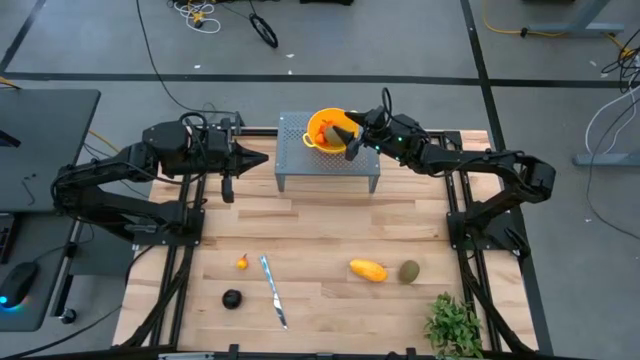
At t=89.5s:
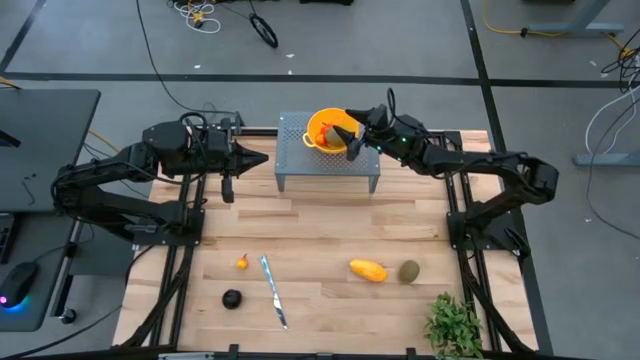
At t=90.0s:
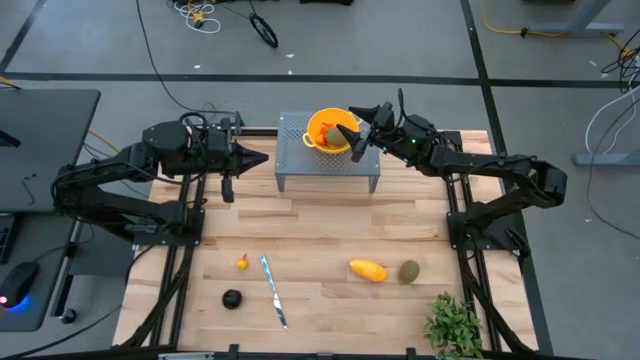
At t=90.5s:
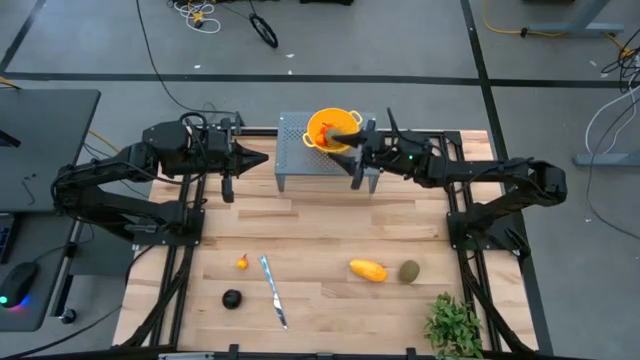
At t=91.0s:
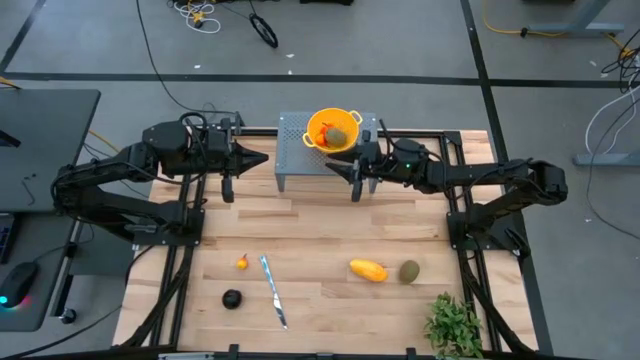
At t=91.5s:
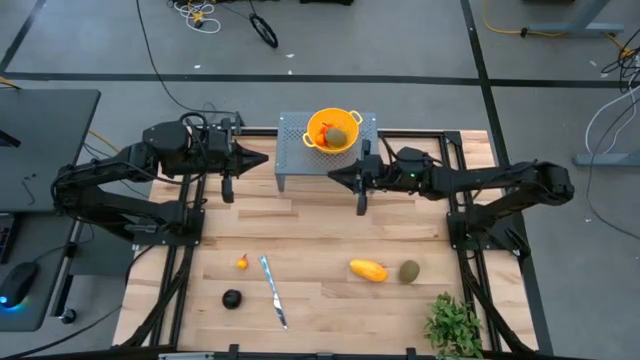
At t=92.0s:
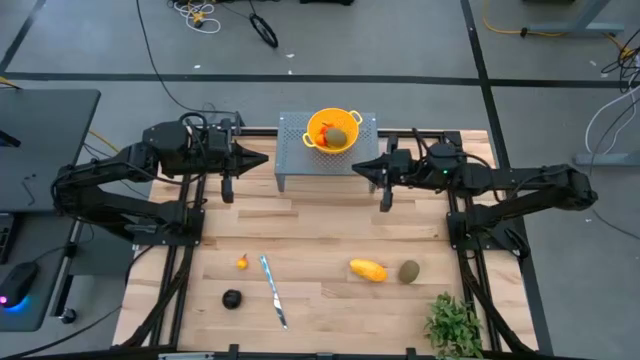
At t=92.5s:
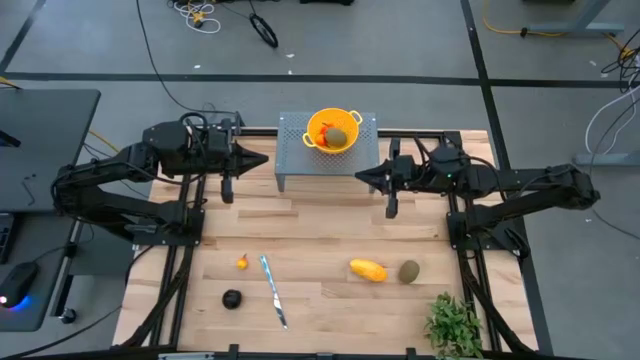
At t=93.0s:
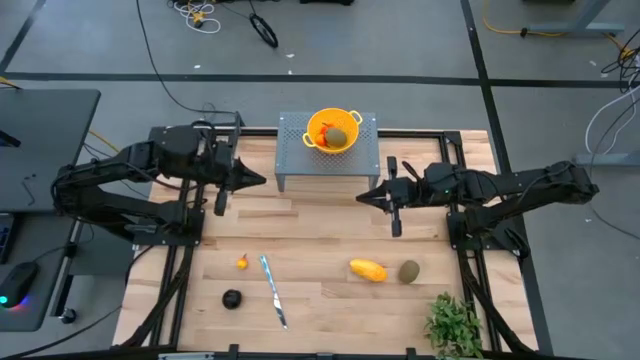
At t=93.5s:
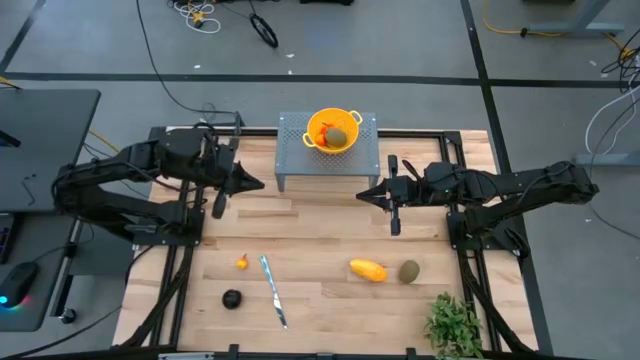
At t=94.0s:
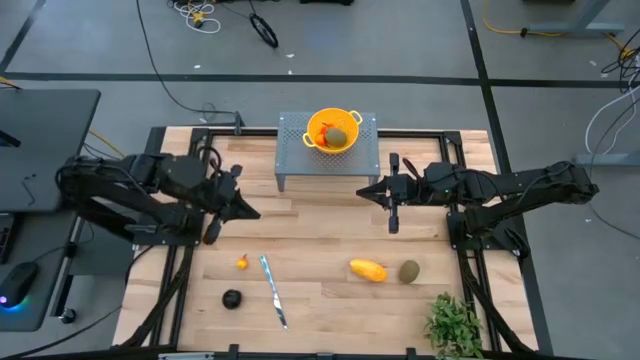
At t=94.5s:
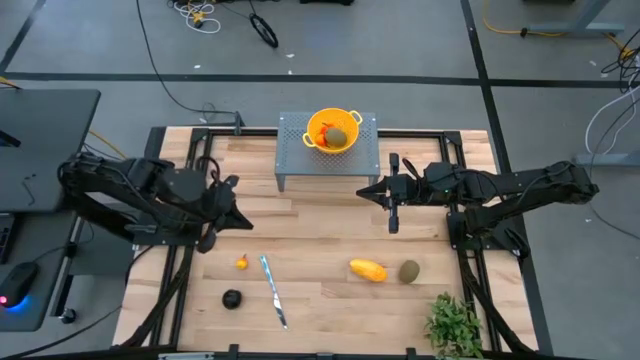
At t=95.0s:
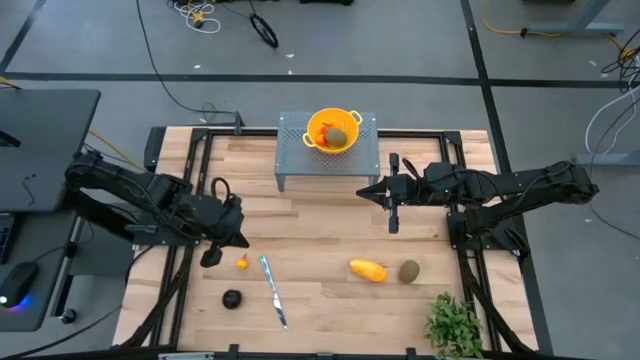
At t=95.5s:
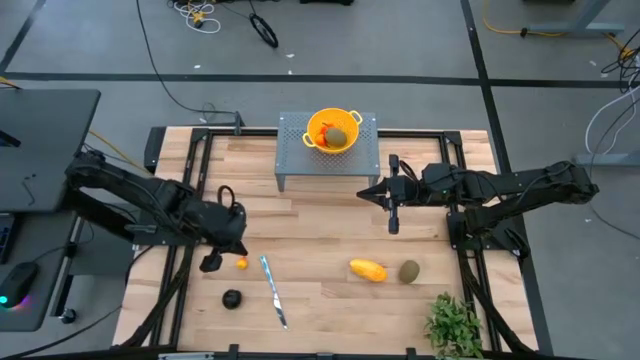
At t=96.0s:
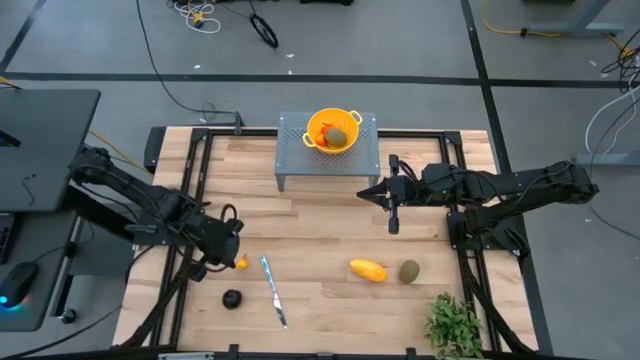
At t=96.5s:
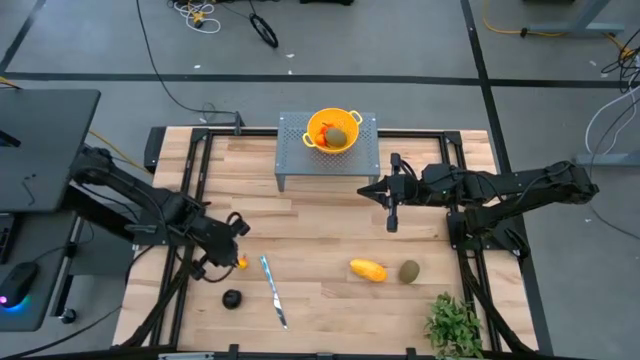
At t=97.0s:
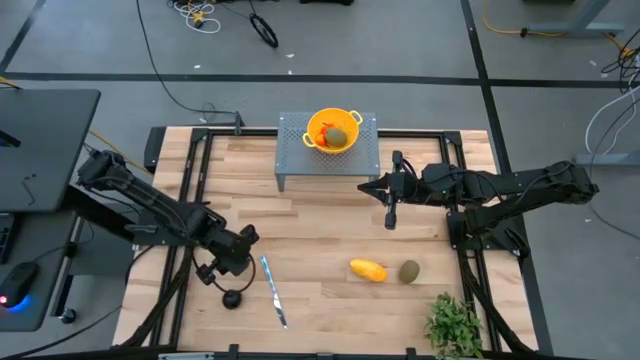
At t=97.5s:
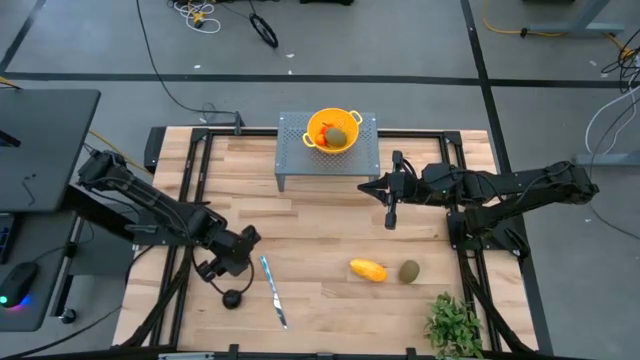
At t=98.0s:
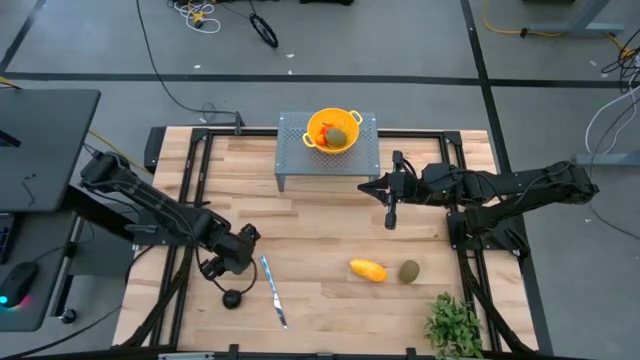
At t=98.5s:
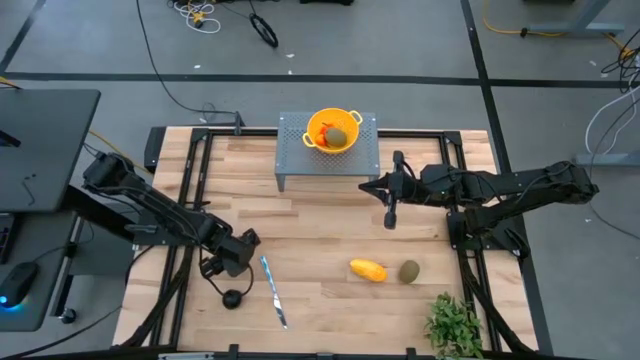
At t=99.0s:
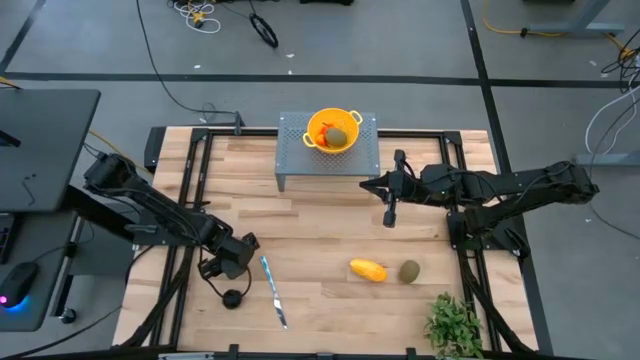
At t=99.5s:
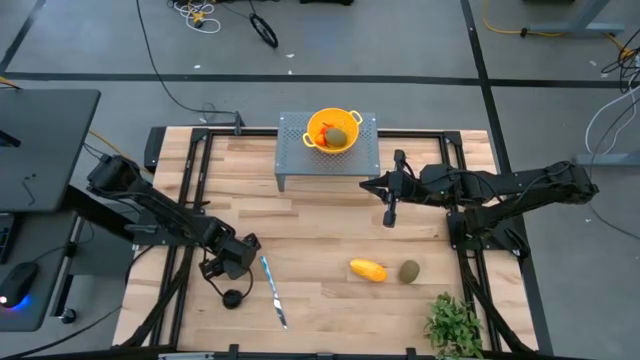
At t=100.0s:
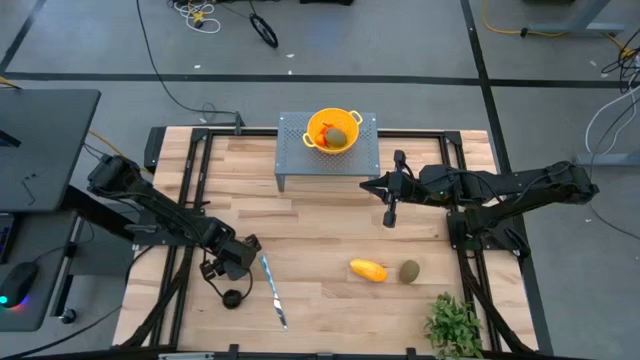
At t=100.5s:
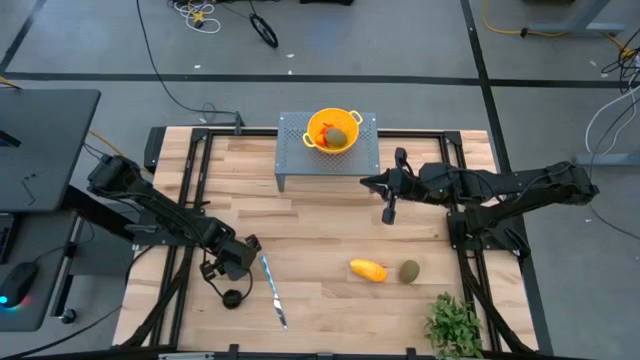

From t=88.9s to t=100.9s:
Task: Pick & Place Fruit
Put the pear into the yellow colander bowl on the shelf

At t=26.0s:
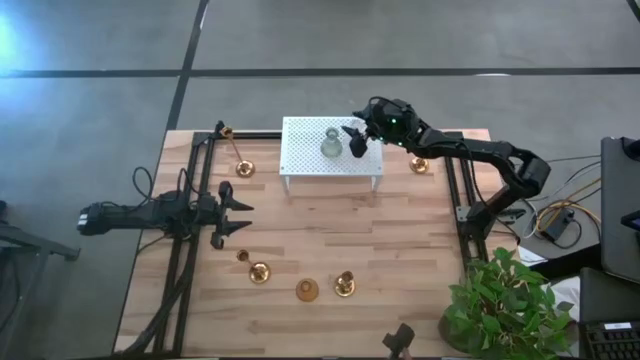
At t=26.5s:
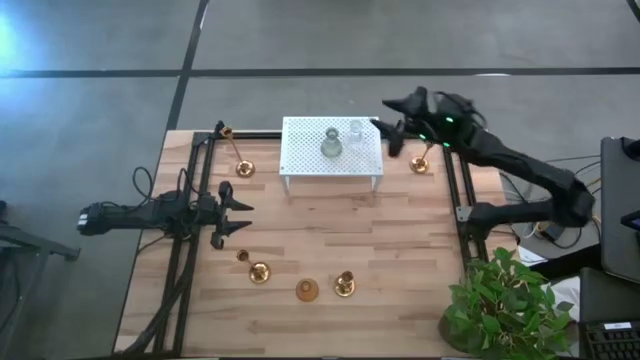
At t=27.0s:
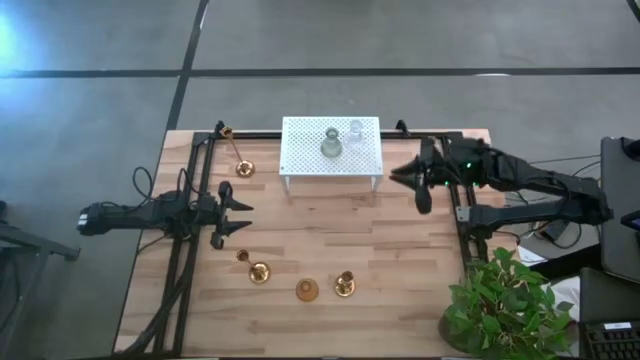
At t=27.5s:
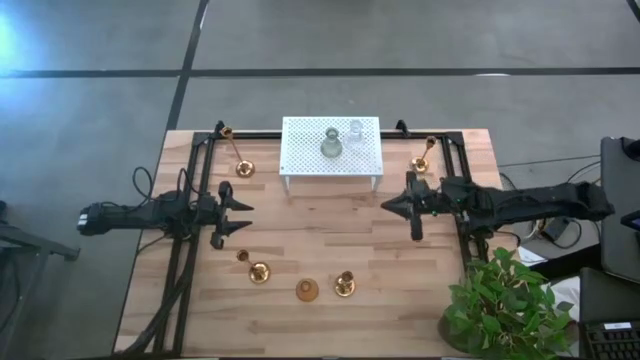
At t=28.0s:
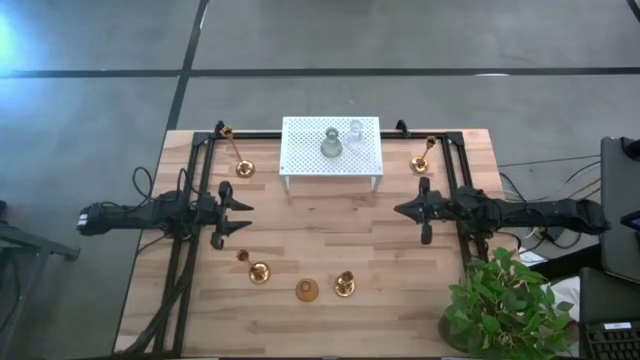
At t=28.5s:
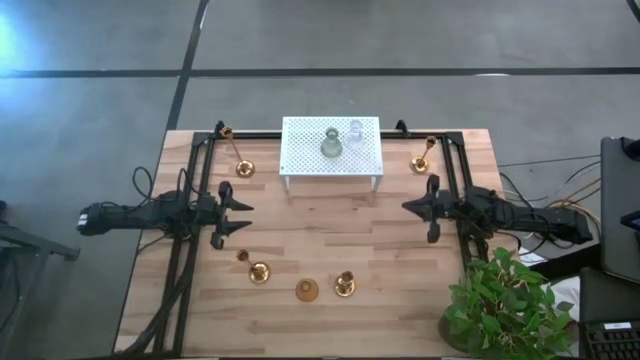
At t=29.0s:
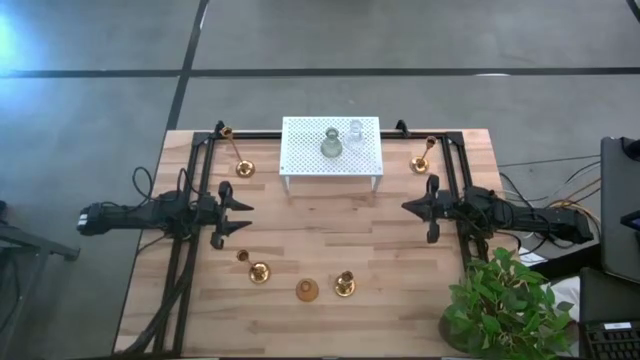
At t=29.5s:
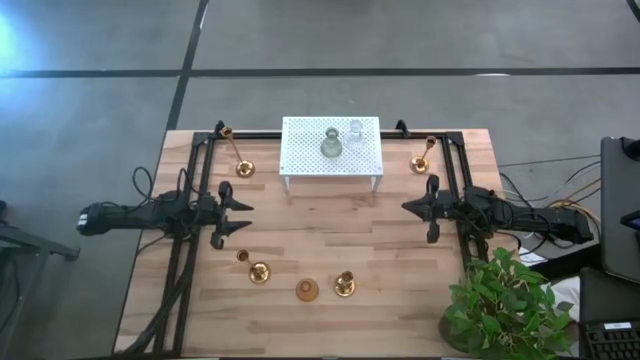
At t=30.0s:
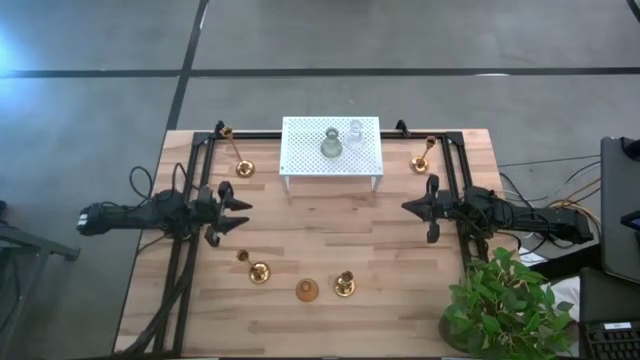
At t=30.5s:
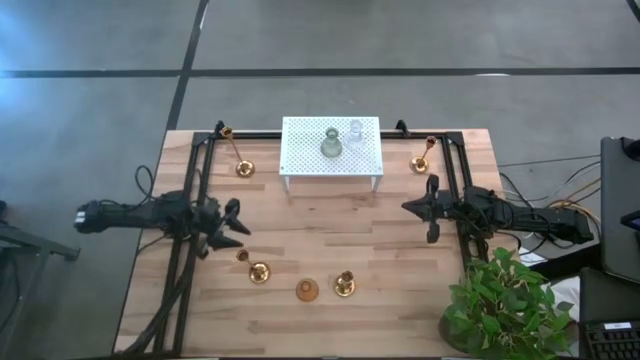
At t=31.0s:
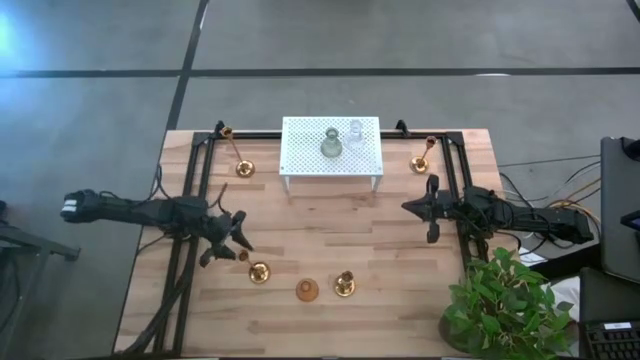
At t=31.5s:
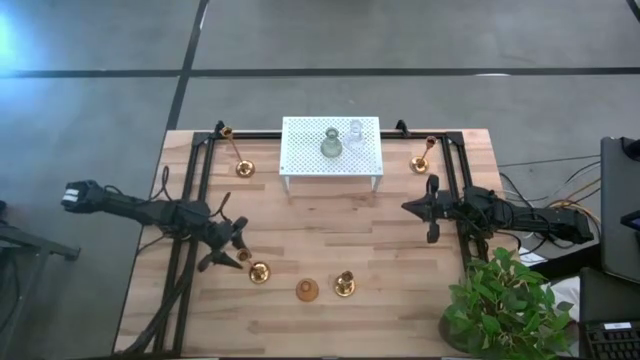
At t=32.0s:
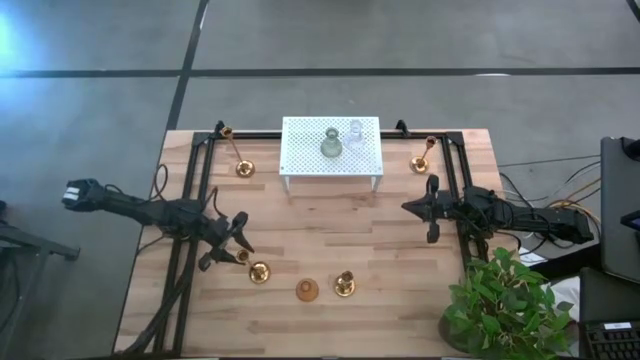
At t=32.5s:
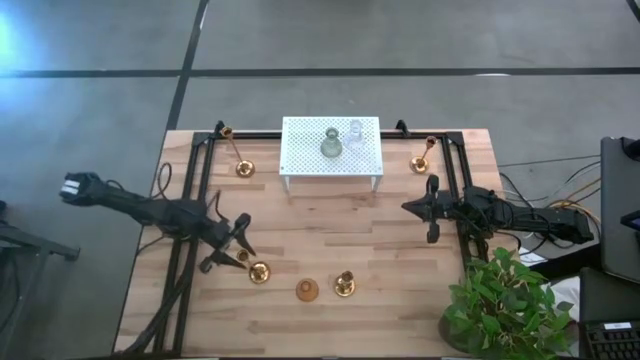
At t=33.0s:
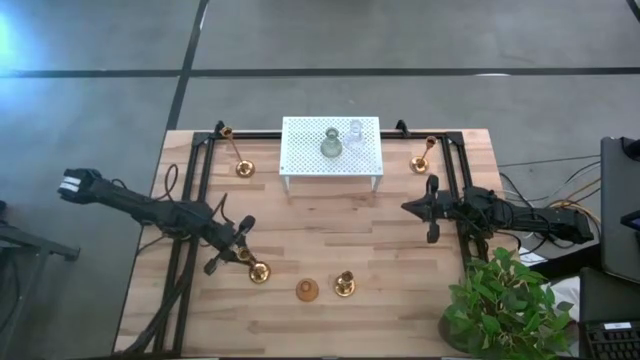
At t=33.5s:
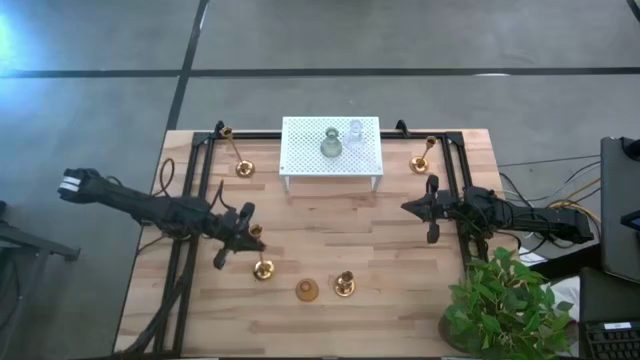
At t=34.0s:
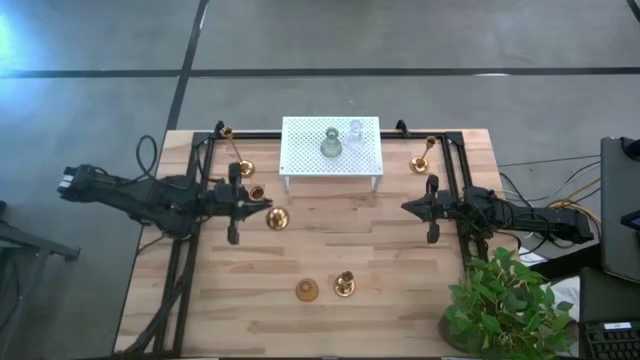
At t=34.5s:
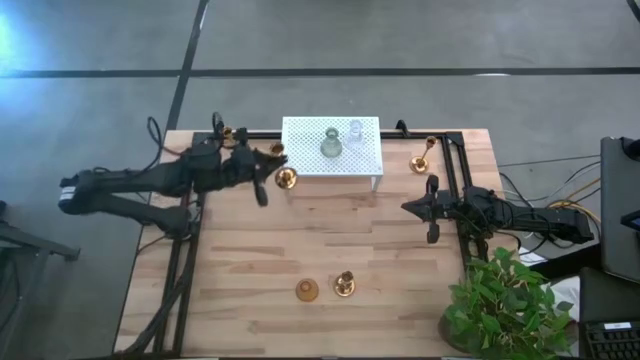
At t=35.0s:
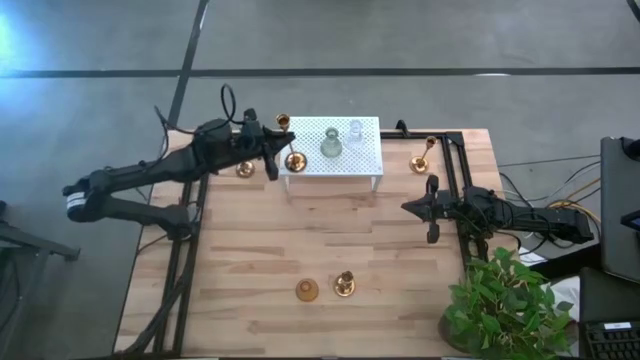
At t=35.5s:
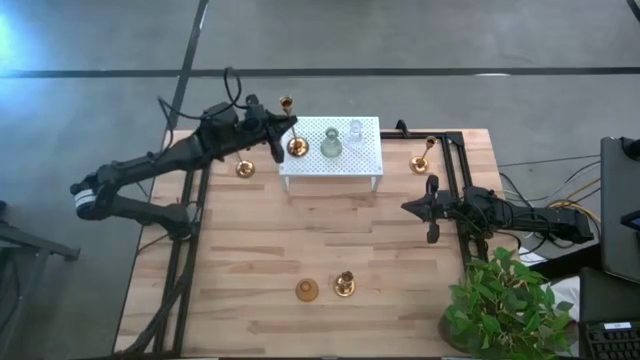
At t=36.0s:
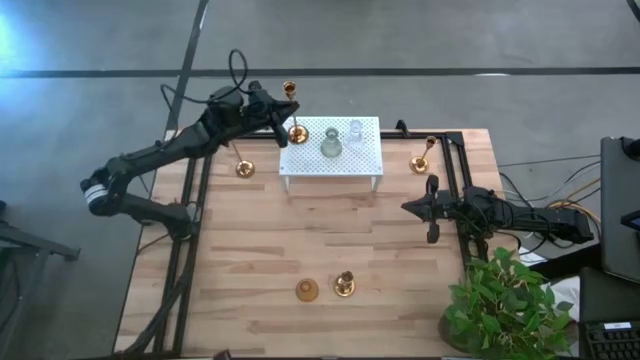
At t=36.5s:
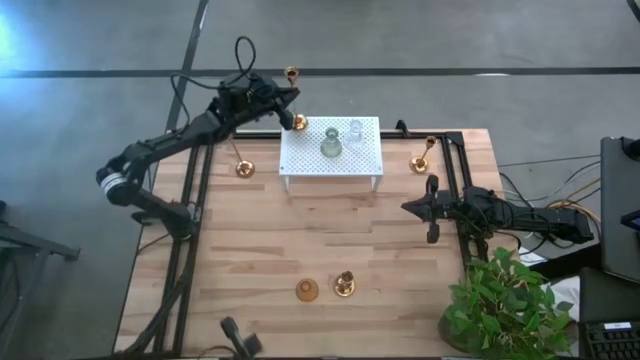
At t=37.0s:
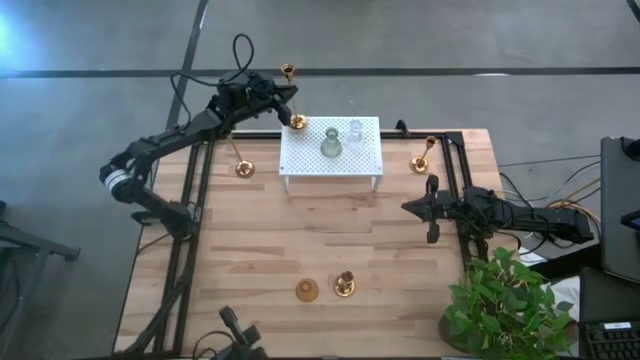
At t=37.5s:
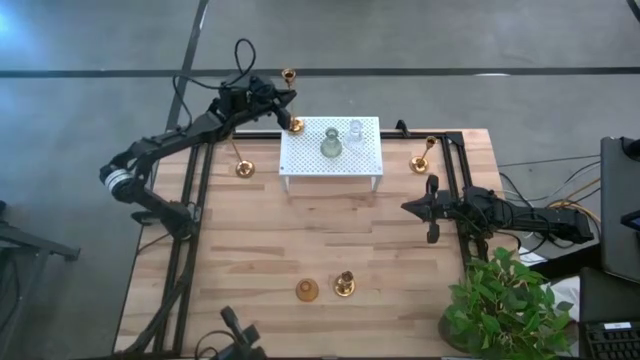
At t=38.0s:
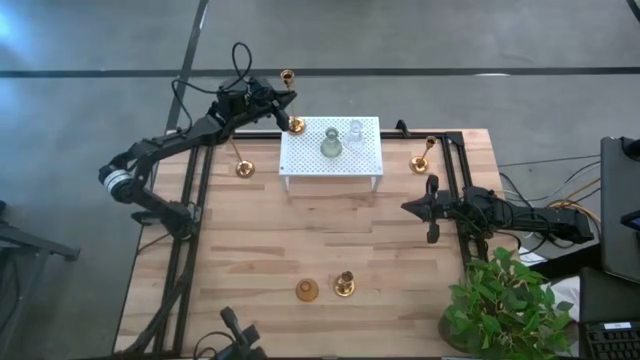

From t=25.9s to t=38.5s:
Task: Pick & Place candle stick holders
Put the golden candle holder on the shelf
